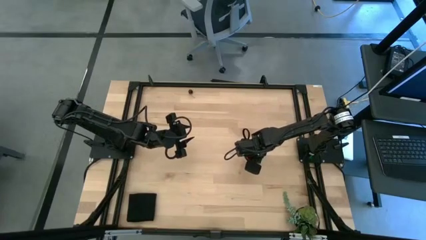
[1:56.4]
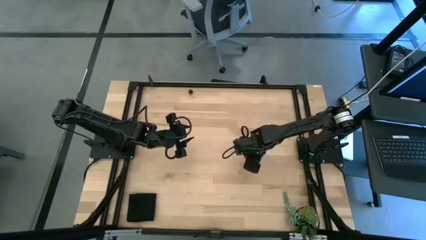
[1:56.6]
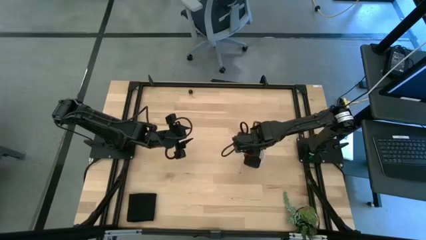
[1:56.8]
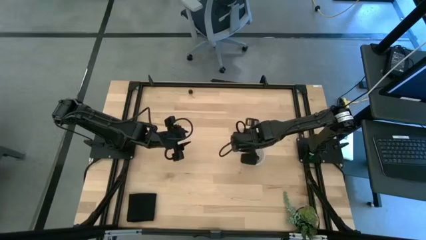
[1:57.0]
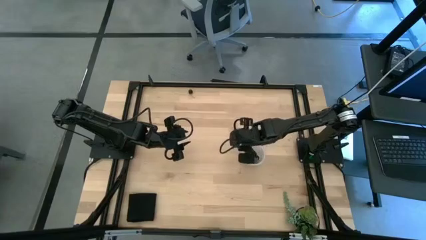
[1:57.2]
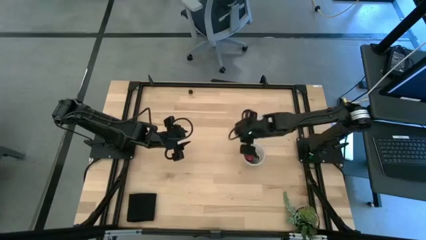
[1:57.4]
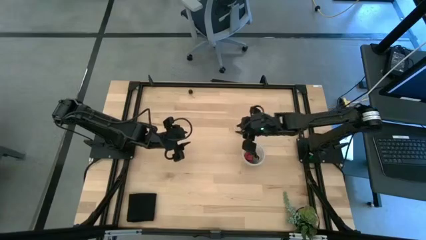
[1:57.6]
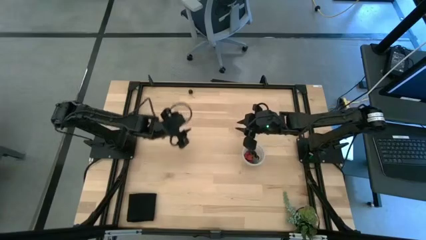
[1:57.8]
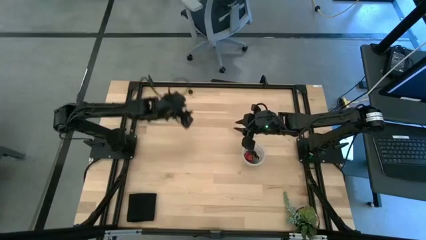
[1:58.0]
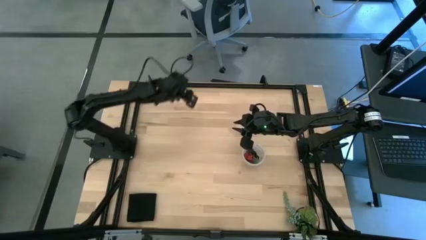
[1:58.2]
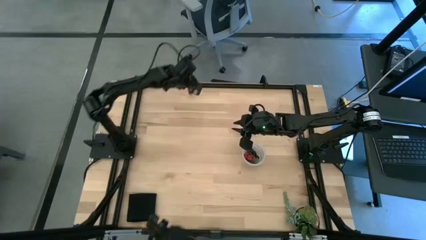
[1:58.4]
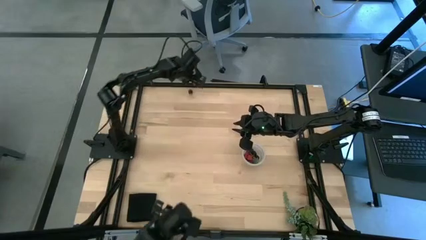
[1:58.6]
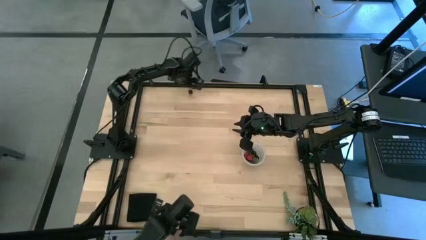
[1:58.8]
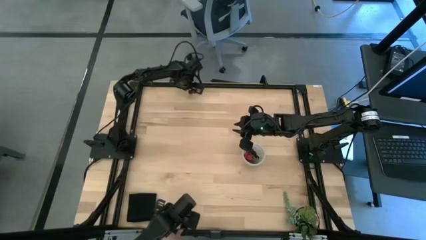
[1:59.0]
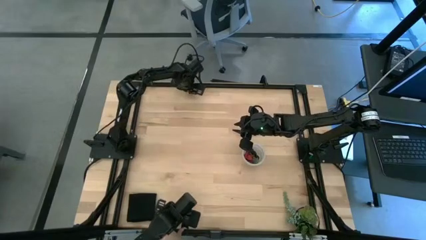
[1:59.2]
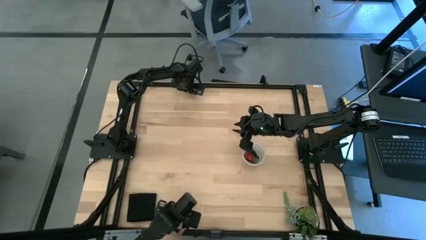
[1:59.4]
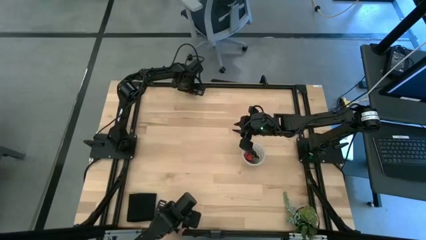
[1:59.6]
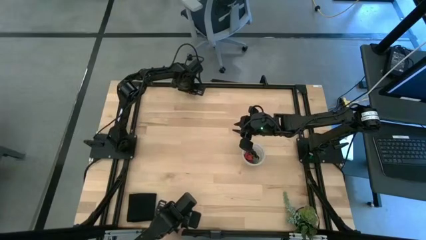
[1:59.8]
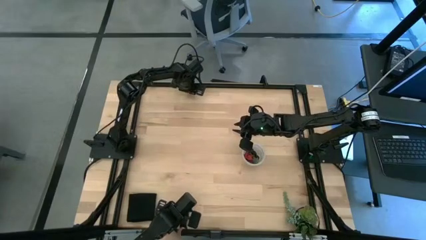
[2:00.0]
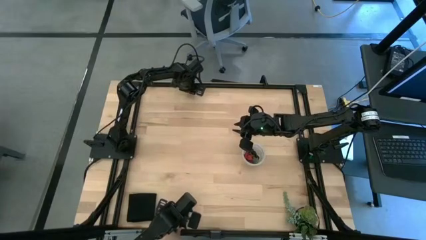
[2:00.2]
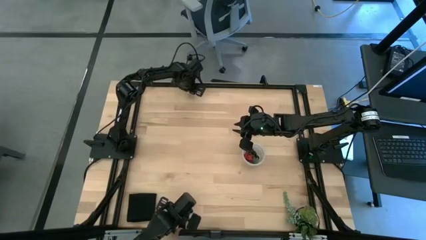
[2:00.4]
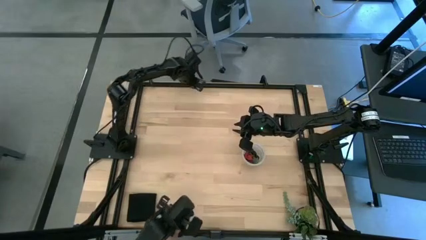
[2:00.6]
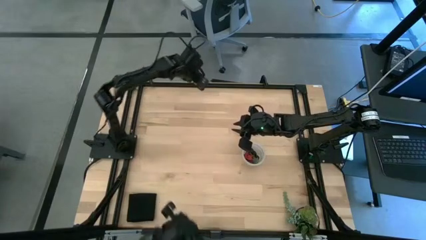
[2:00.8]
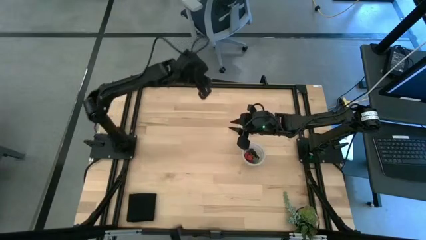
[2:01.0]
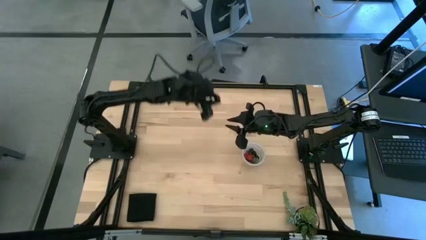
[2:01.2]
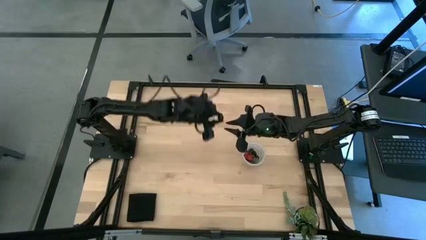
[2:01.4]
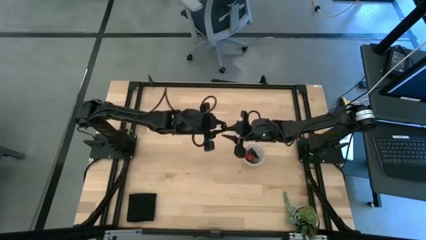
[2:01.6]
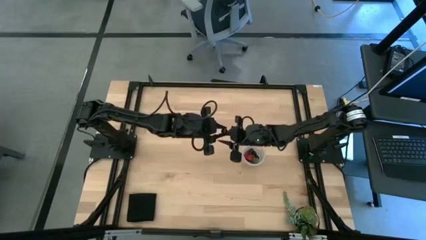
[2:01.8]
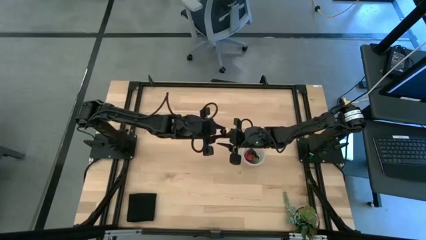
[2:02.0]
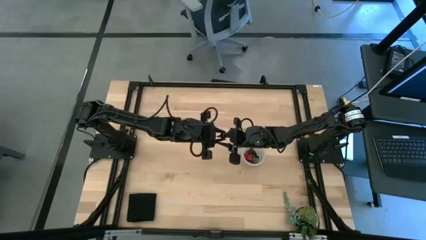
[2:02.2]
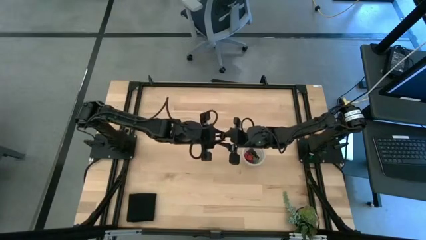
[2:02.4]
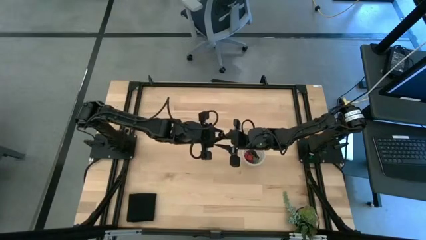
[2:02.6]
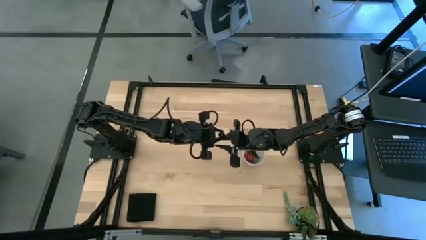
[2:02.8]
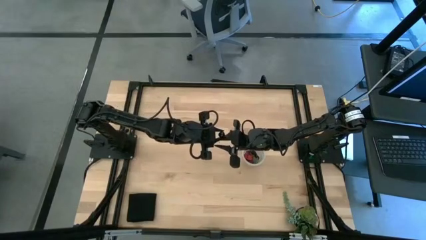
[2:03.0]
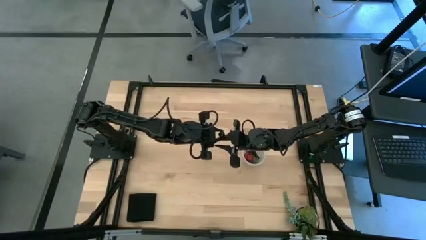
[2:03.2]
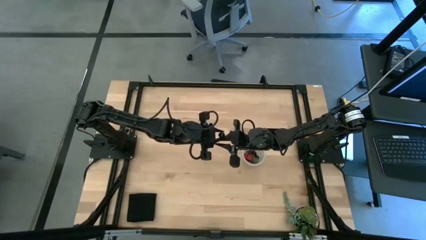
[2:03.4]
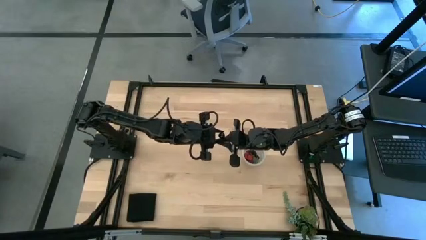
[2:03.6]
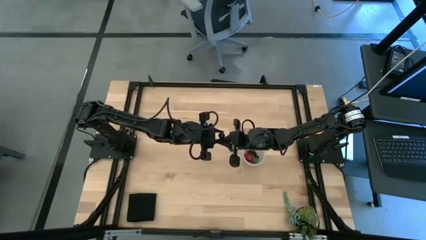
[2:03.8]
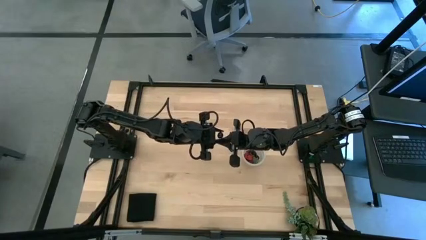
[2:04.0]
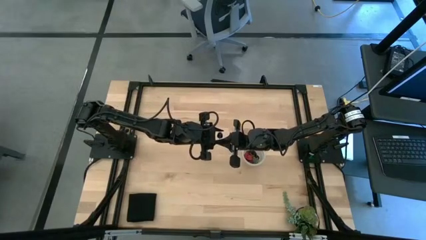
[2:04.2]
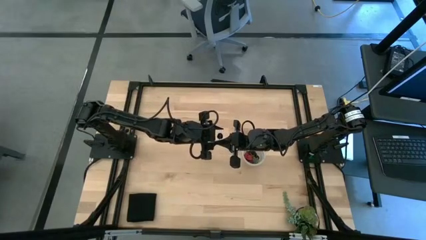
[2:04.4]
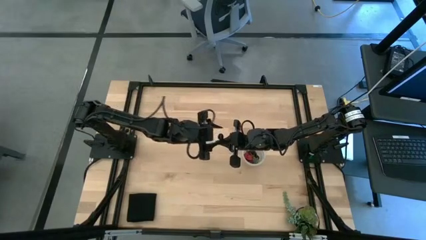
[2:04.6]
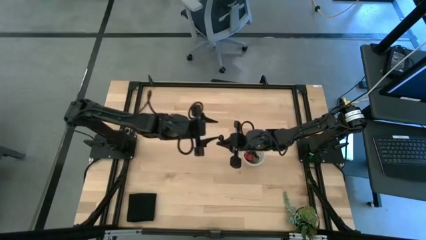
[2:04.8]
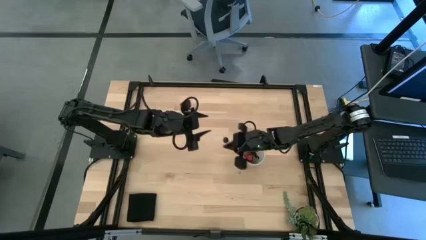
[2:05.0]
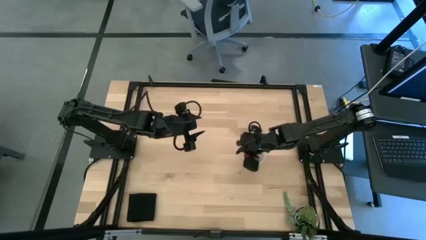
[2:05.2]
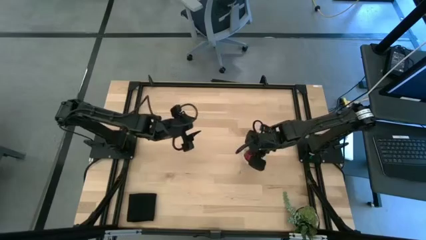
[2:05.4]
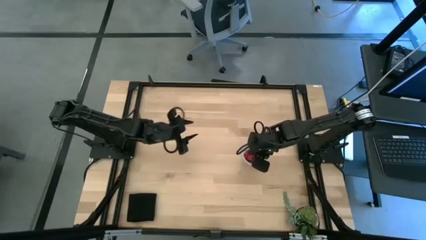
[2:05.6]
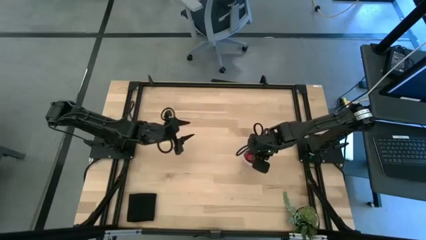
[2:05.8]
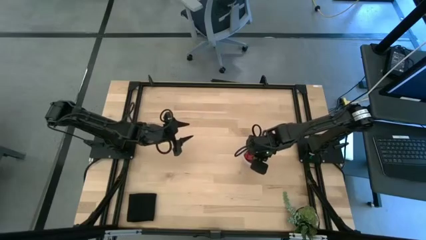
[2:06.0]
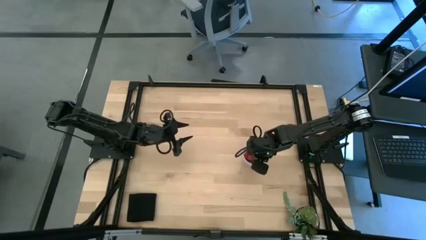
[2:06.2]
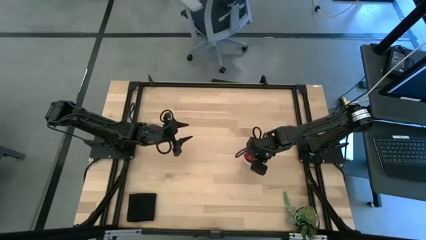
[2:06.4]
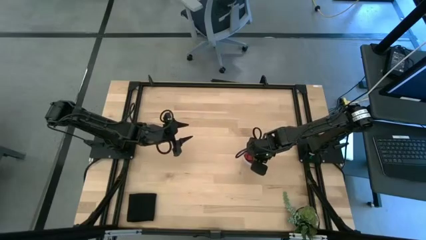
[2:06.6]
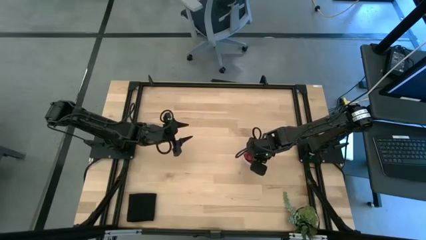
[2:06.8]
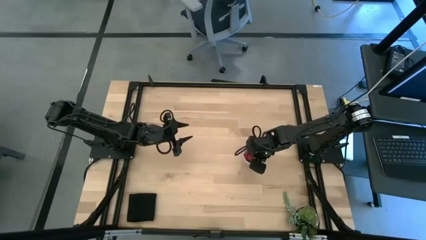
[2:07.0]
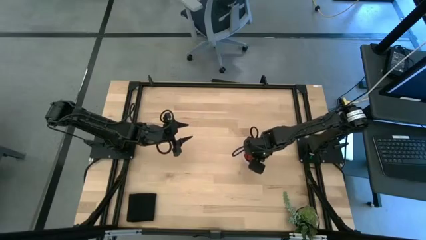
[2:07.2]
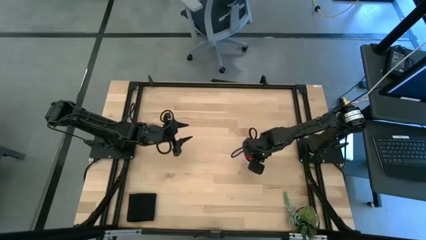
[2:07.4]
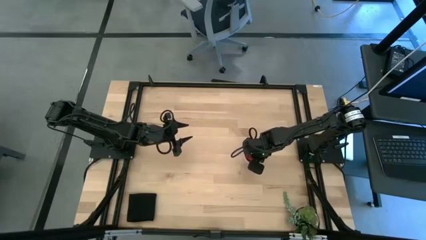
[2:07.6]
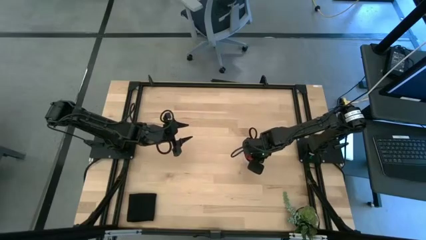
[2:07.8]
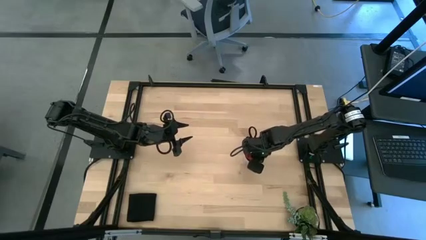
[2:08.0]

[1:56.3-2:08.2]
Task: Pick and placing Produce into tupperware
Put the black cherry into the transparent bucket
